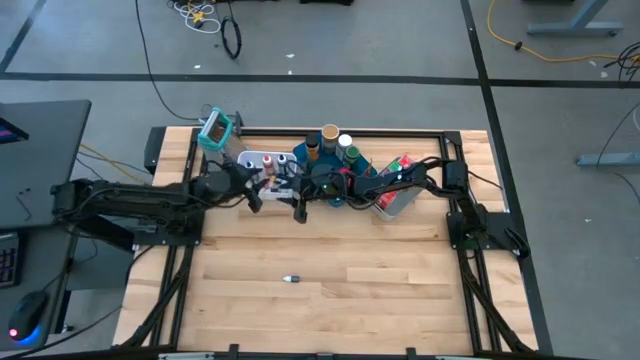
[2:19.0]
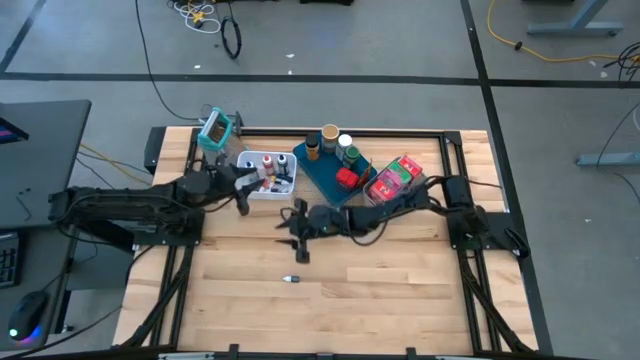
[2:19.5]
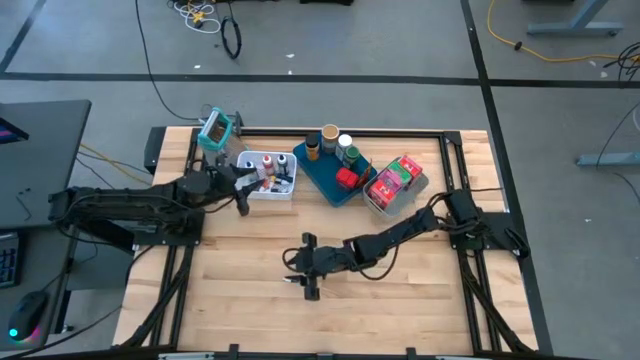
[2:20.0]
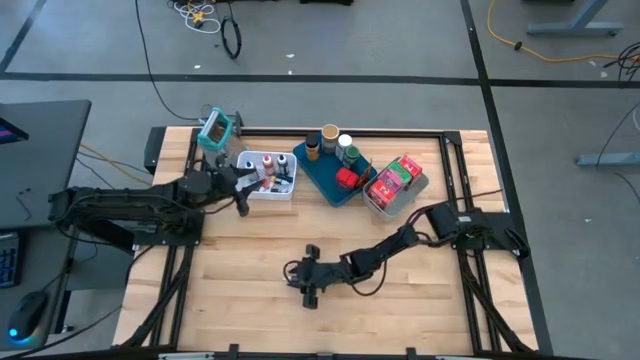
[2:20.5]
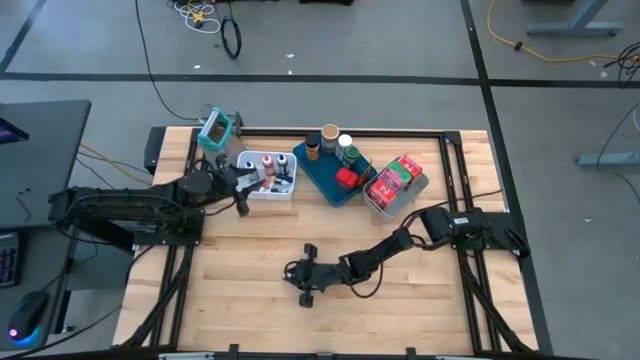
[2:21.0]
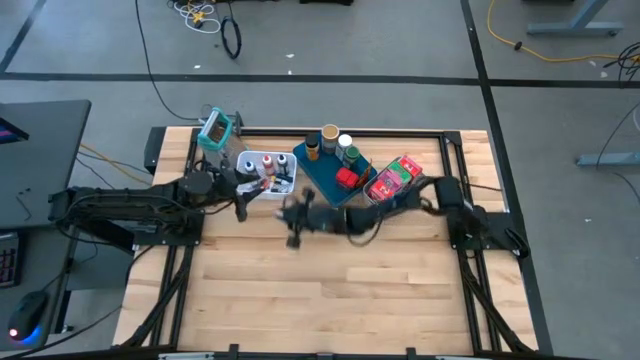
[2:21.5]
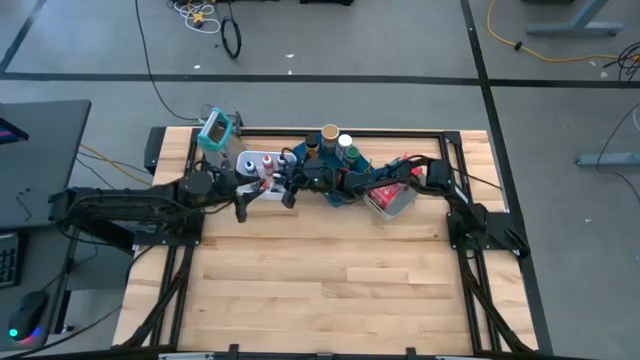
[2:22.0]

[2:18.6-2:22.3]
Task: Pick & Place Kitchen Items
Put the black food coloring bottle into the white bin

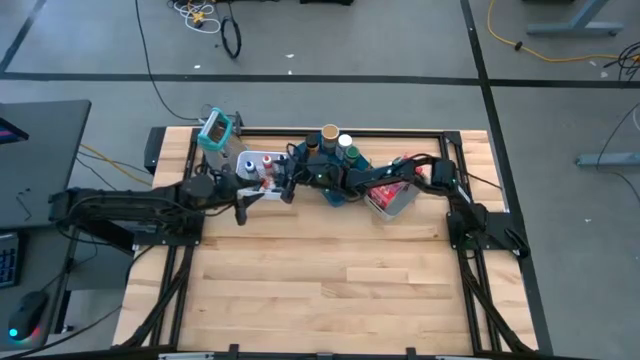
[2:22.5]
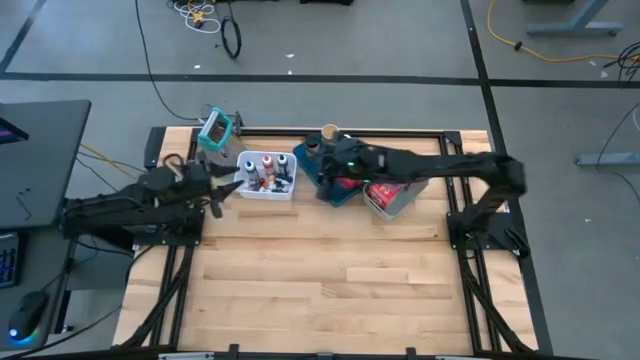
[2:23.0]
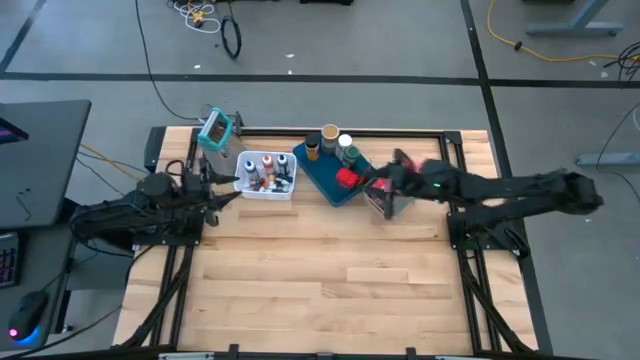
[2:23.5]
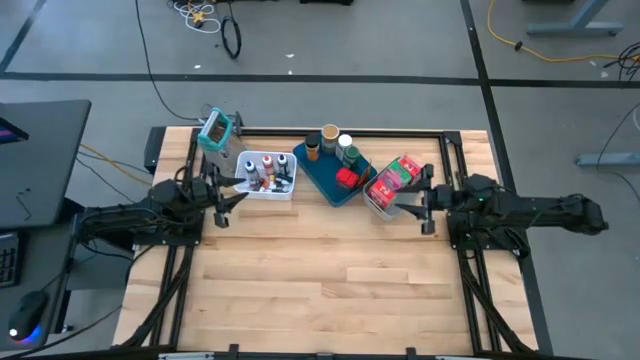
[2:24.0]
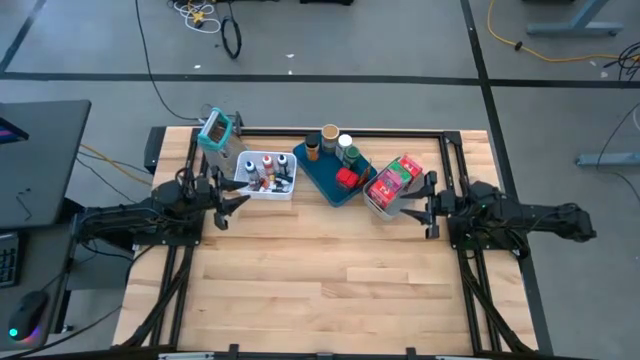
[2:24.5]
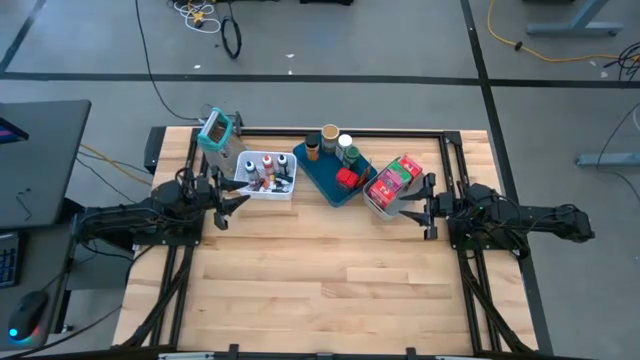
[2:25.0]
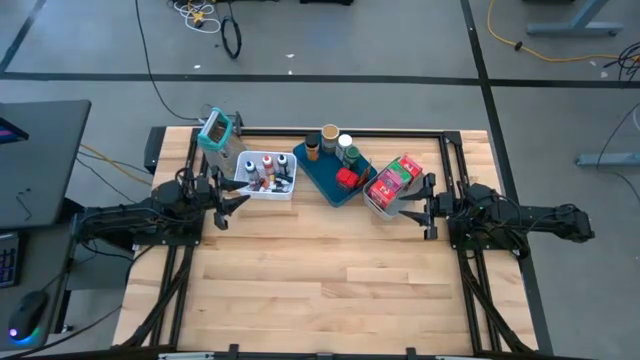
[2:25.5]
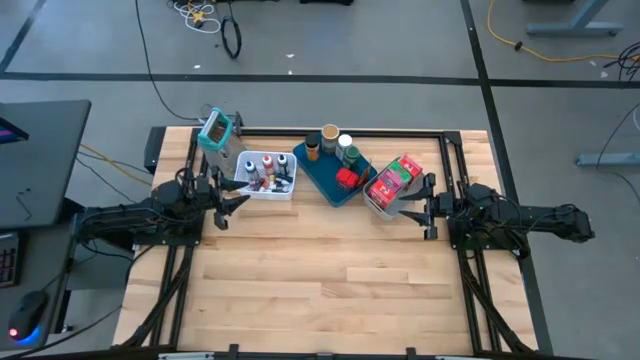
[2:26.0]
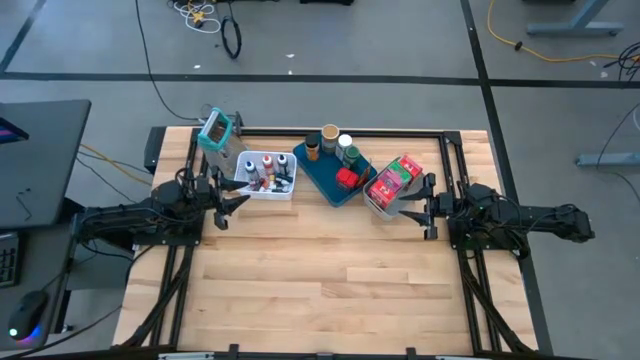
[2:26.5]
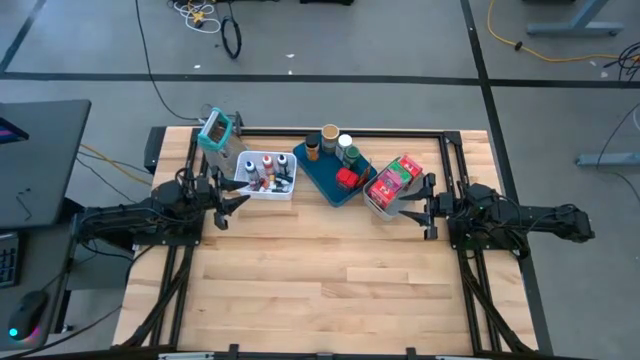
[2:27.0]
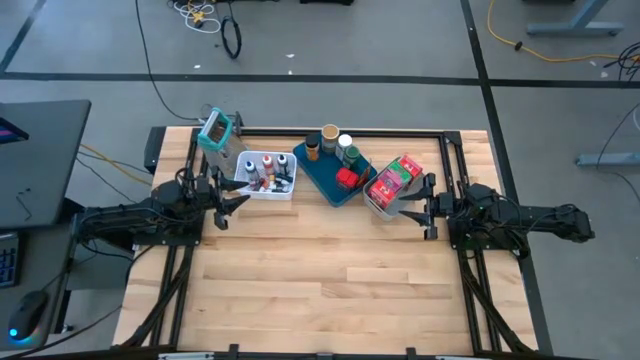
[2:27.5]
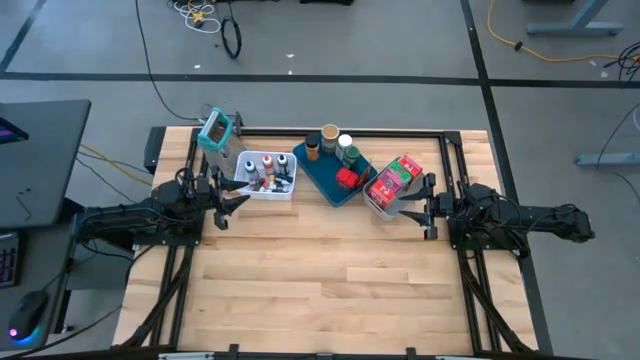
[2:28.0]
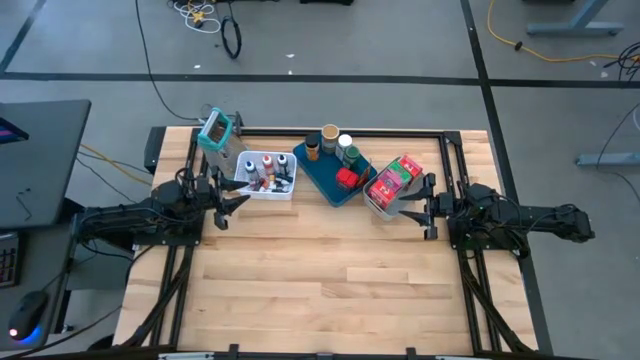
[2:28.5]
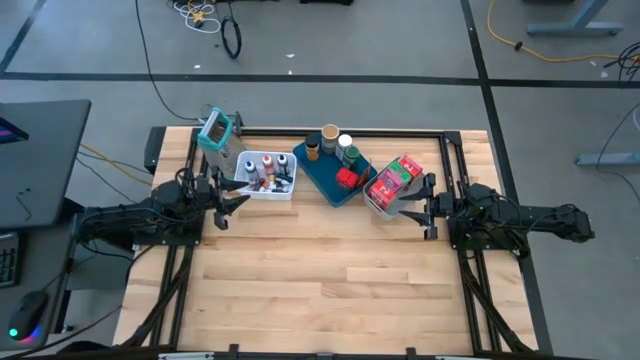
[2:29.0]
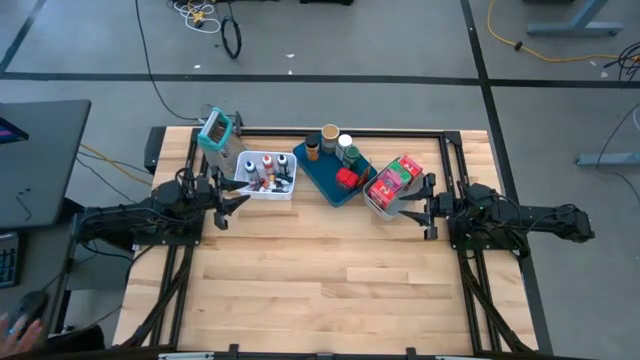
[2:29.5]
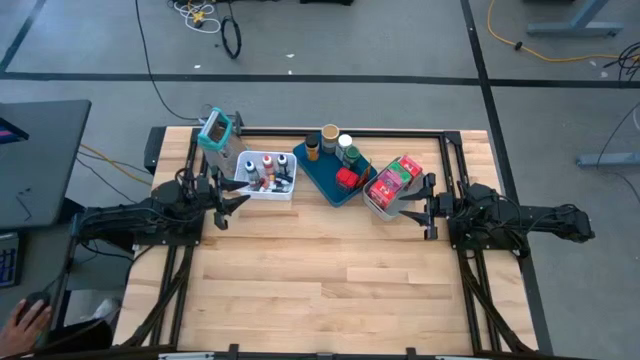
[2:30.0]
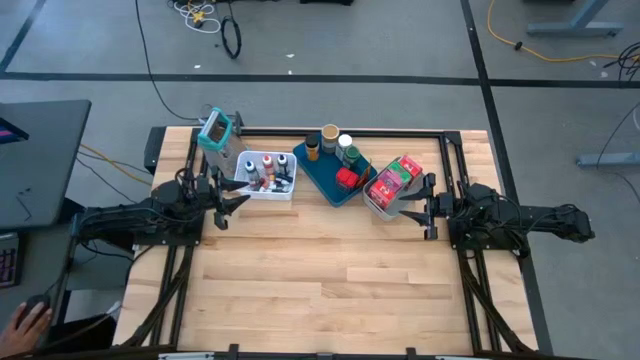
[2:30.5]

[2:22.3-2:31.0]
Return to Home Position

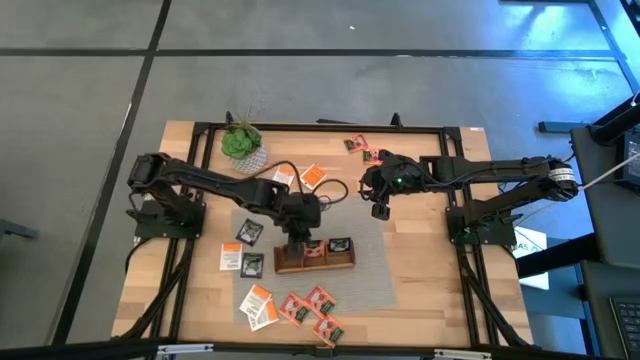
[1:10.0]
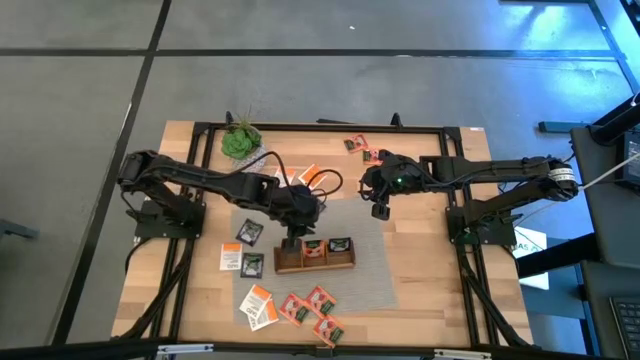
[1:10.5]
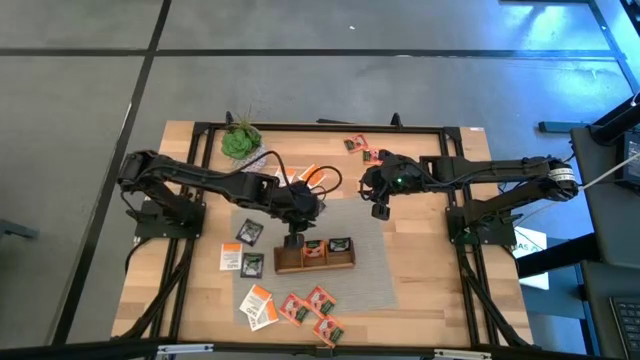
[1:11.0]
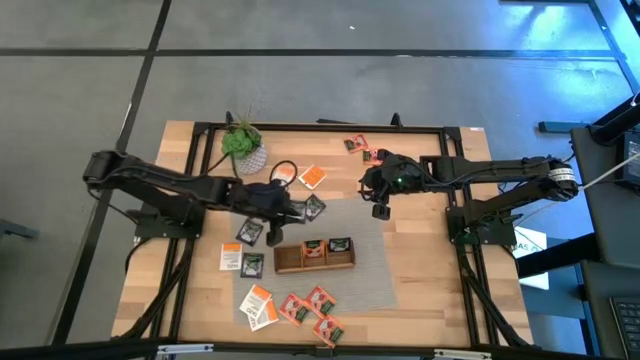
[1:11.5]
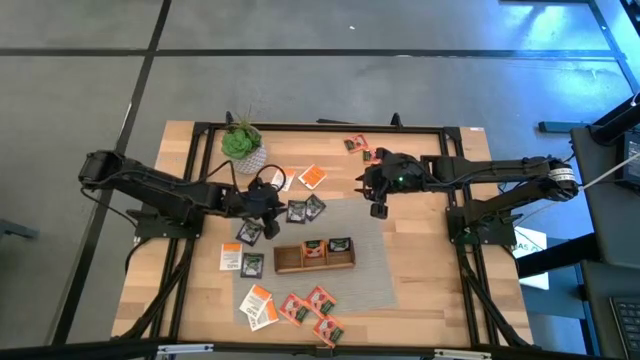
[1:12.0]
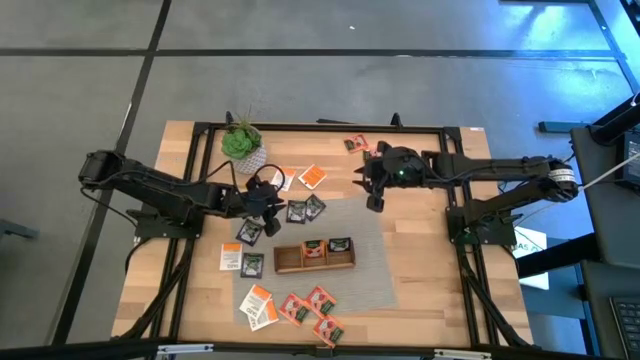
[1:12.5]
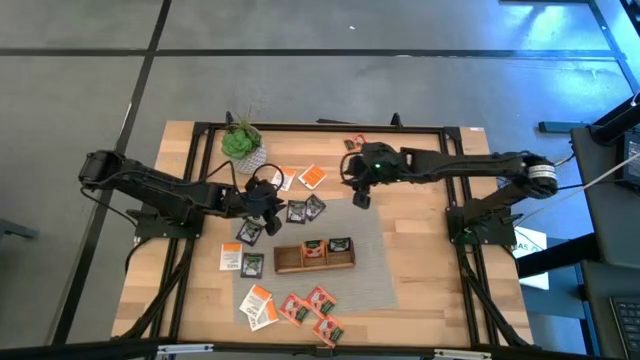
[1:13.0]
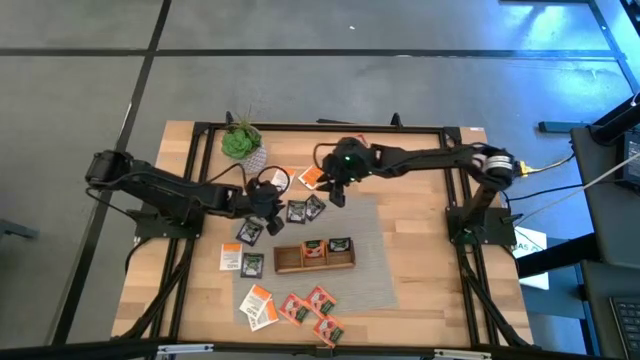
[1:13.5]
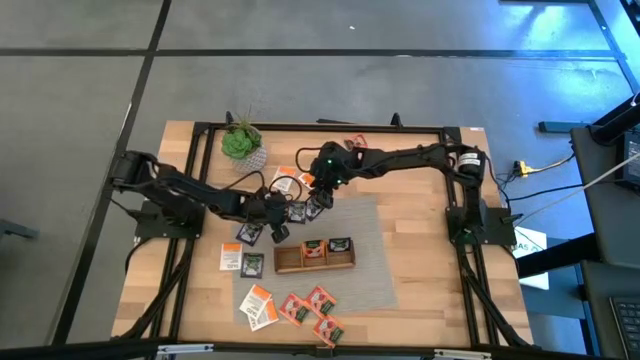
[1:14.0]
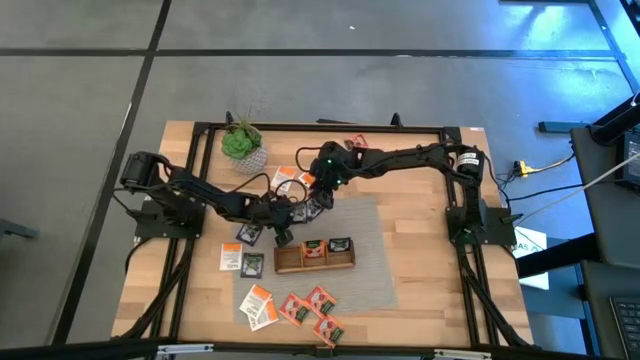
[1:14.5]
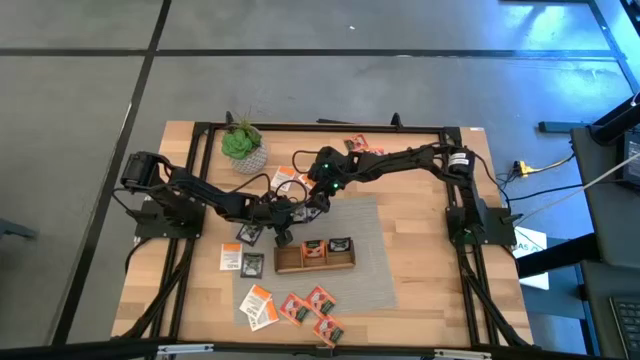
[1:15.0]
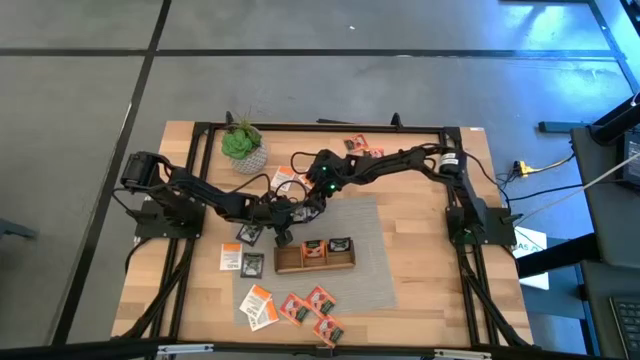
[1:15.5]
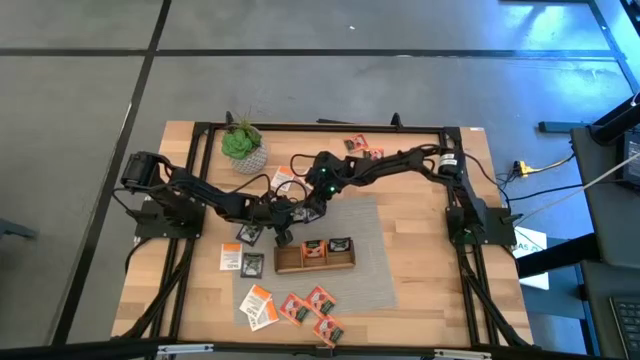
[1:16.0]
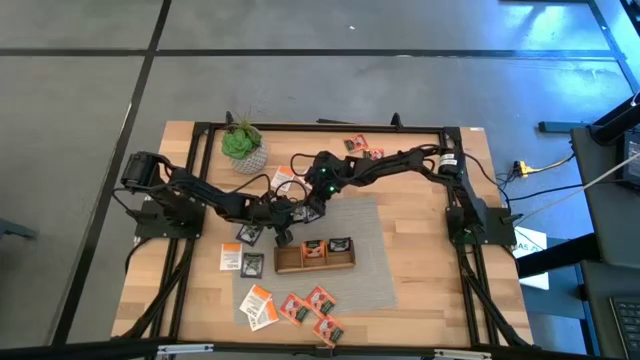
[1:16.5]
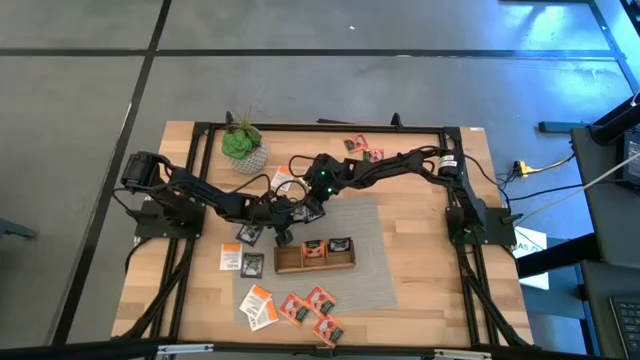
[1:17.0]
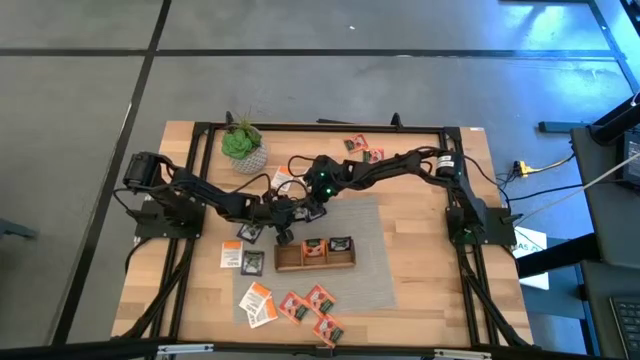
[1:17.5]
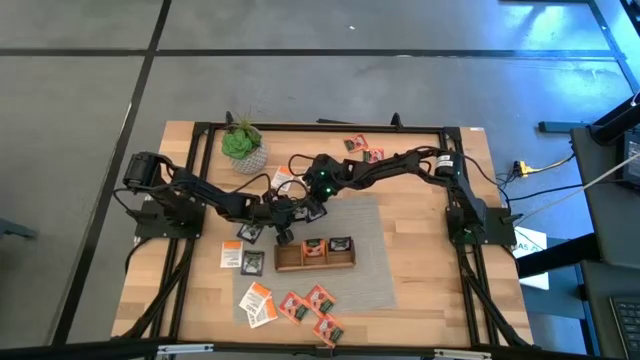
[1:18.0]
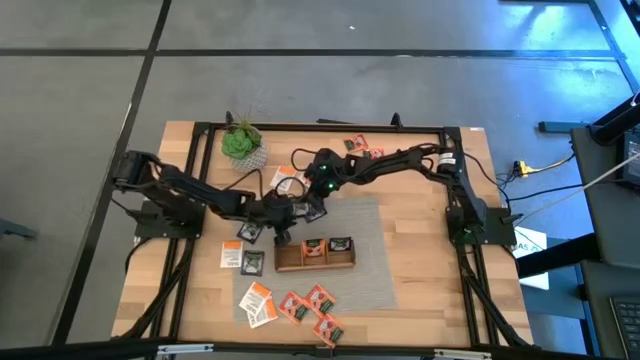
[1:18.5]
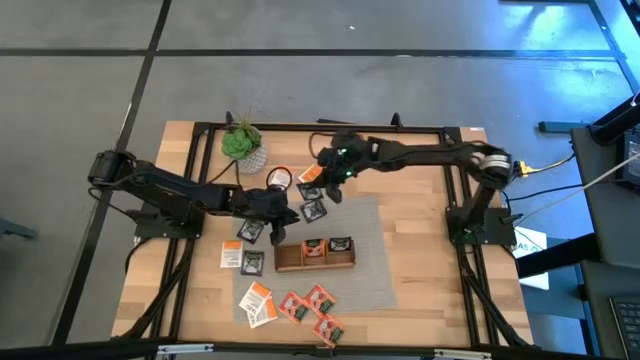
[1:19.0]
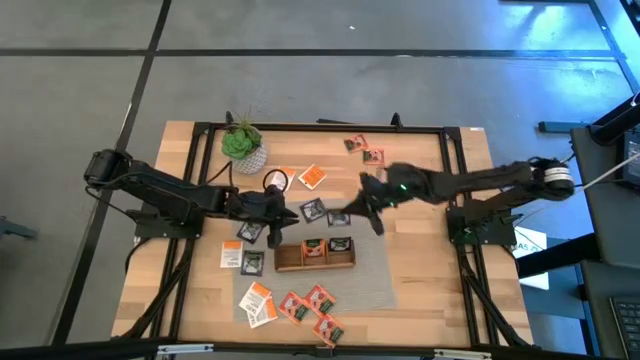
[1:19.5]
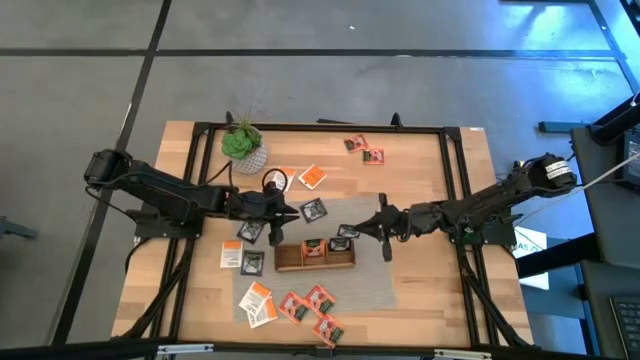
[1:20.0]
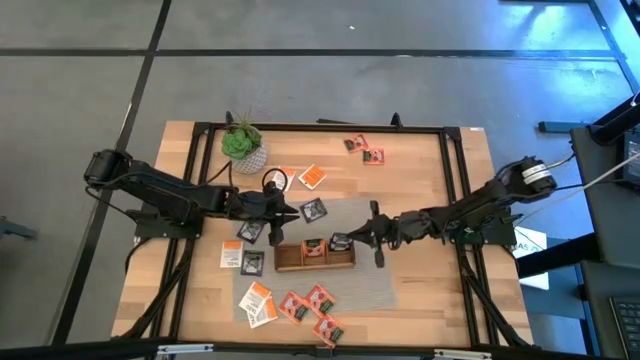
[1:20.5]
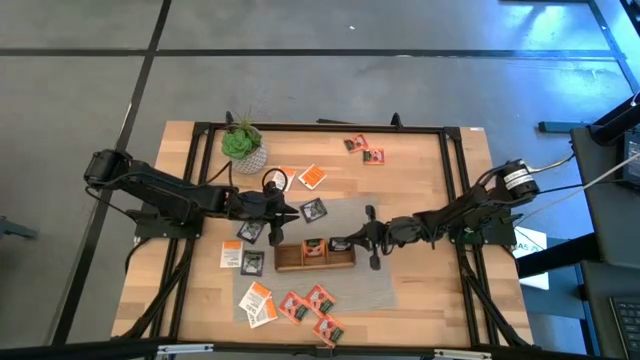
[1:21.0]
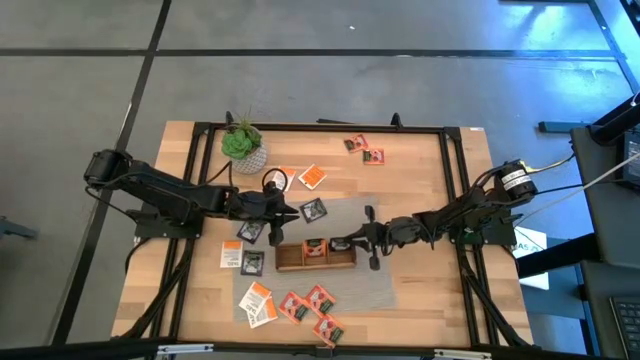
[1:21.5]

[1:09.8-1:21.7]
Task: Pick & Place Tea
Put the purple tea bag into the right section of the wooden organizer
